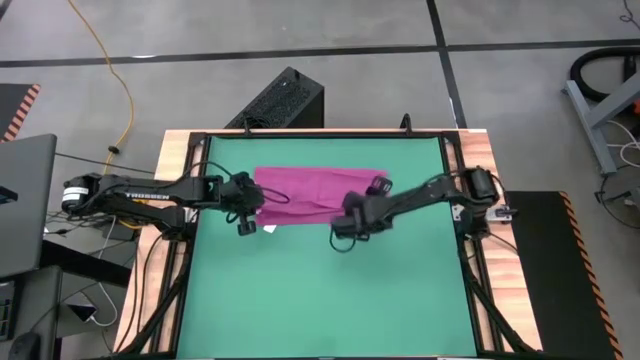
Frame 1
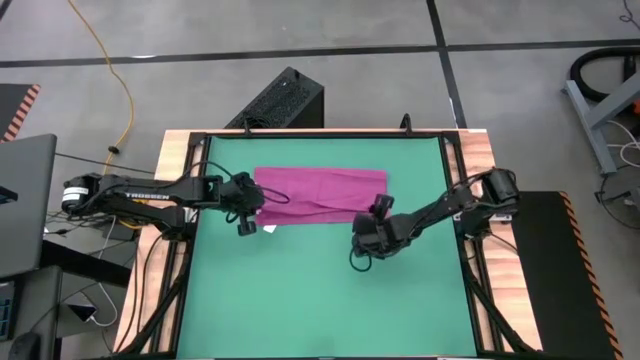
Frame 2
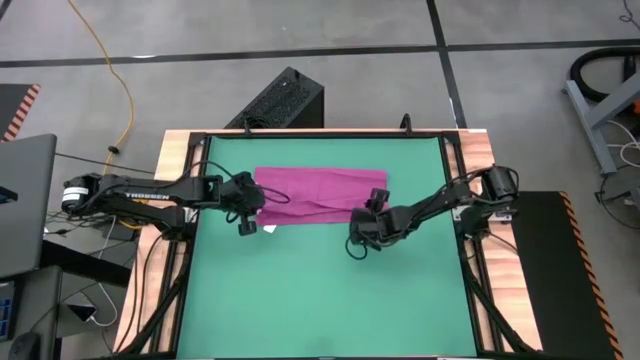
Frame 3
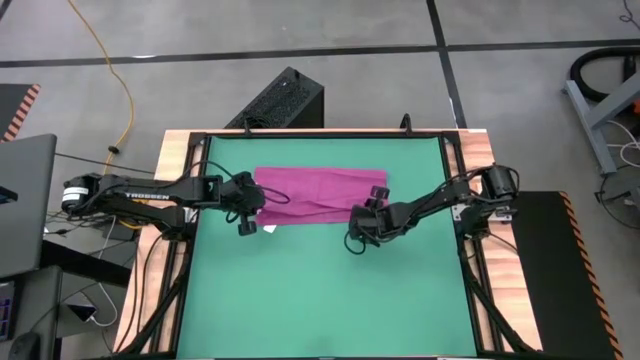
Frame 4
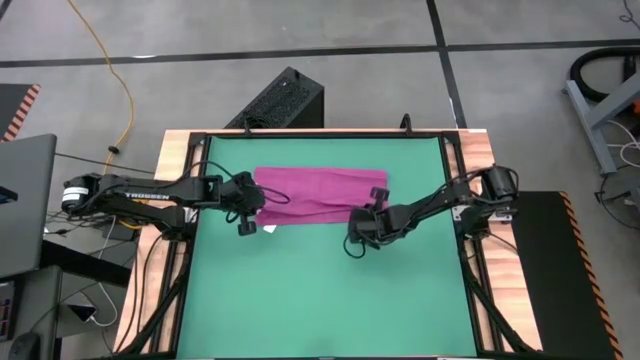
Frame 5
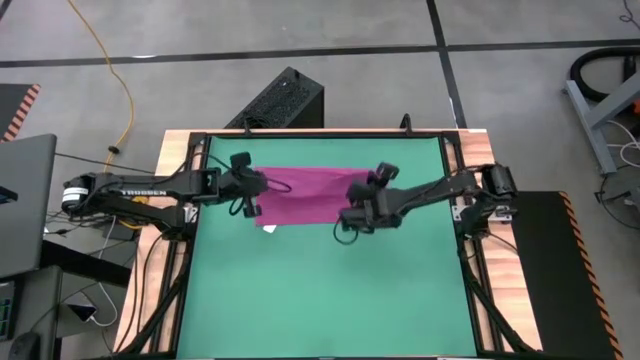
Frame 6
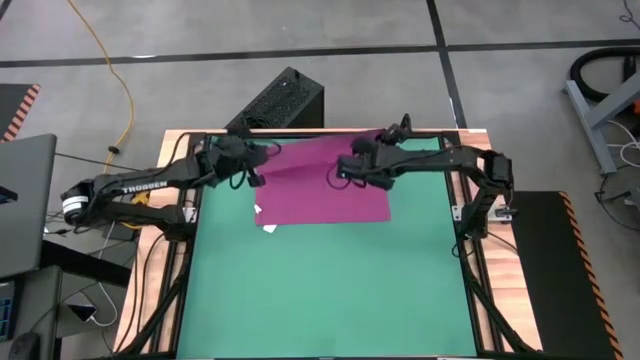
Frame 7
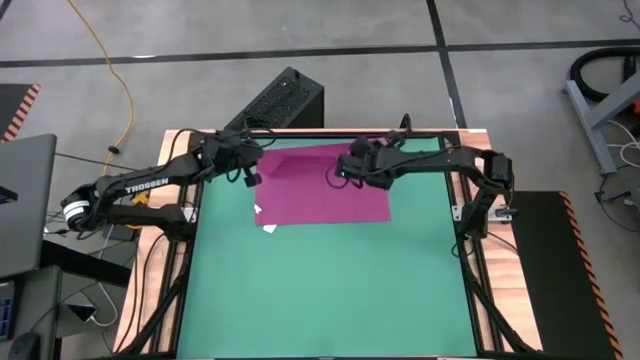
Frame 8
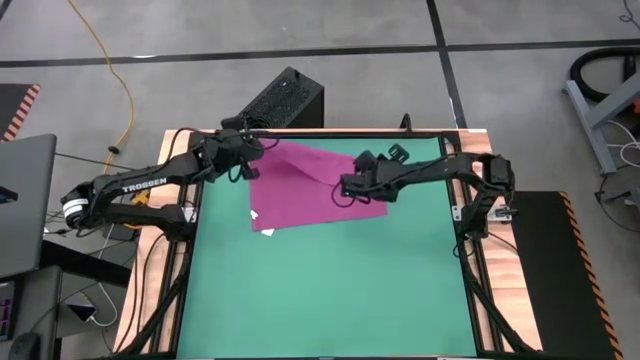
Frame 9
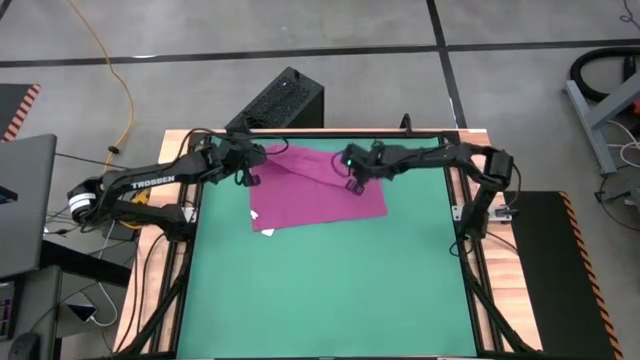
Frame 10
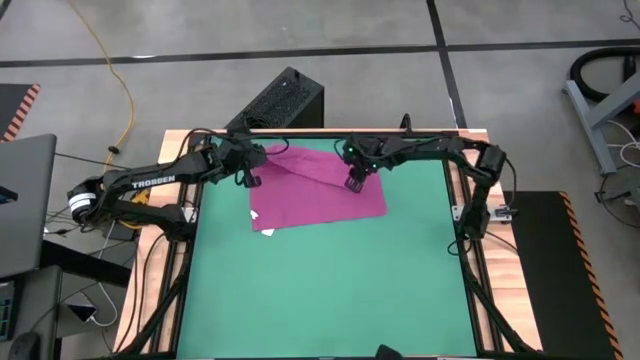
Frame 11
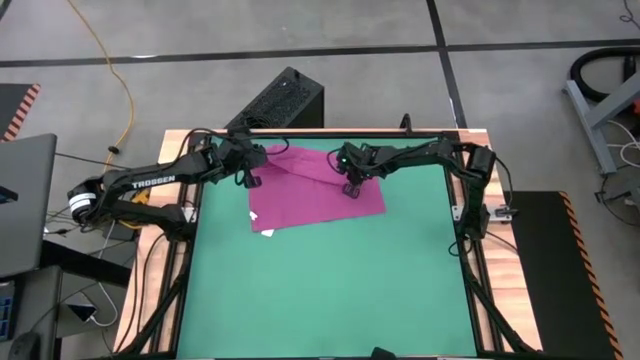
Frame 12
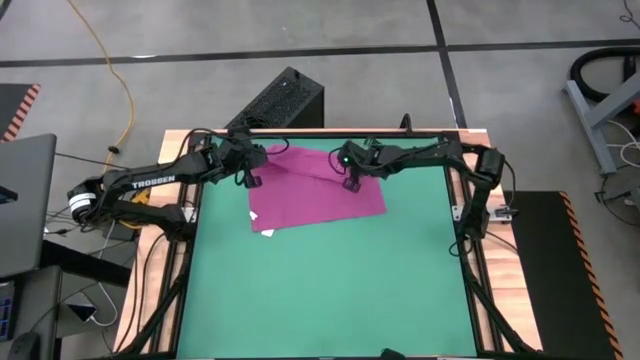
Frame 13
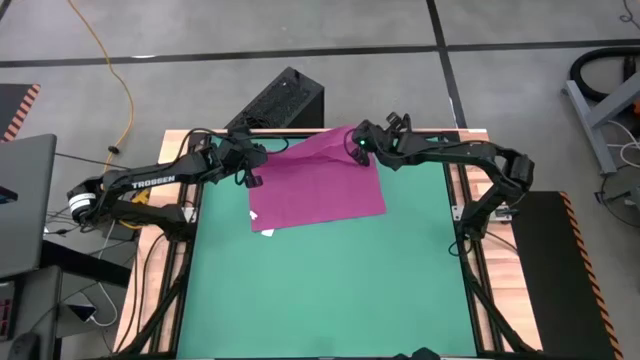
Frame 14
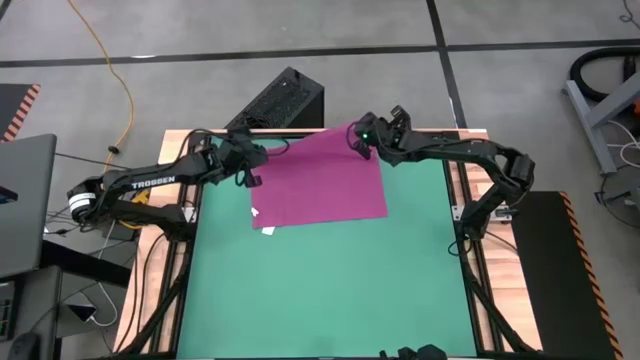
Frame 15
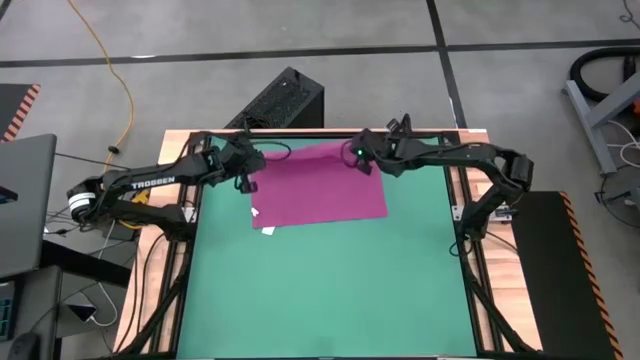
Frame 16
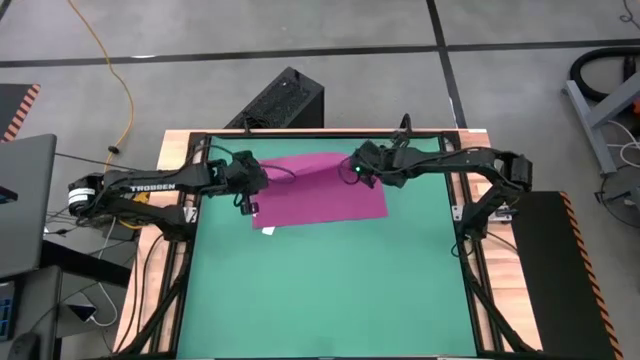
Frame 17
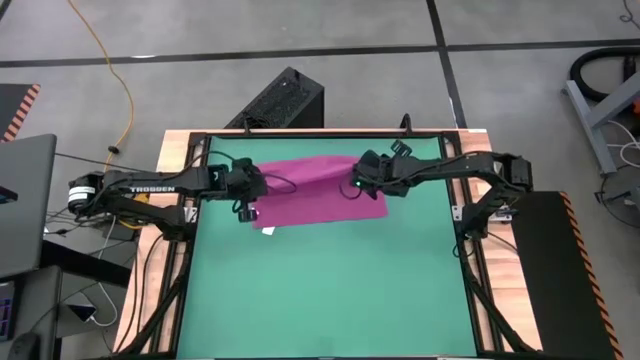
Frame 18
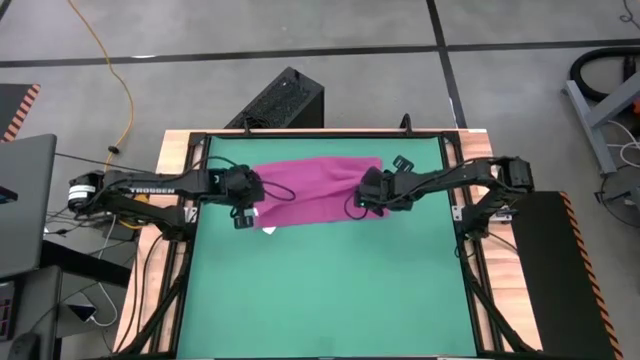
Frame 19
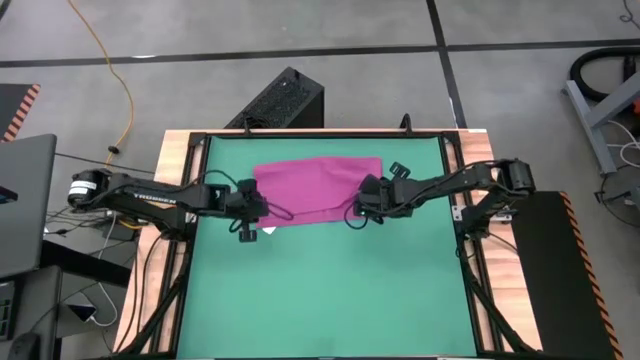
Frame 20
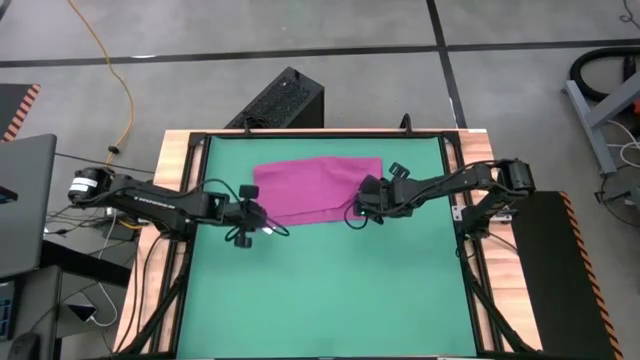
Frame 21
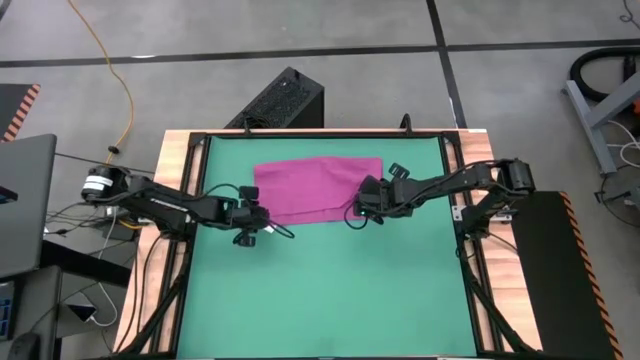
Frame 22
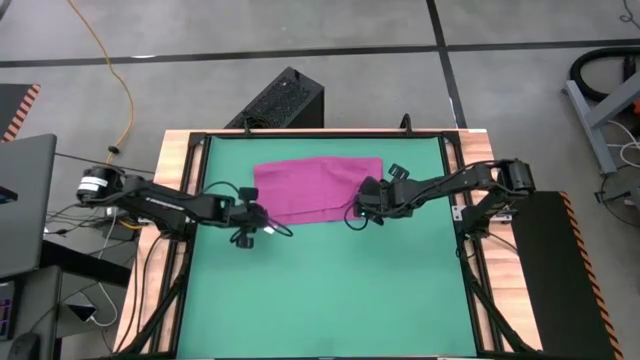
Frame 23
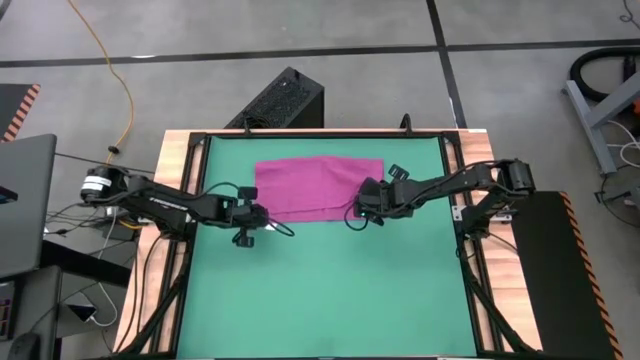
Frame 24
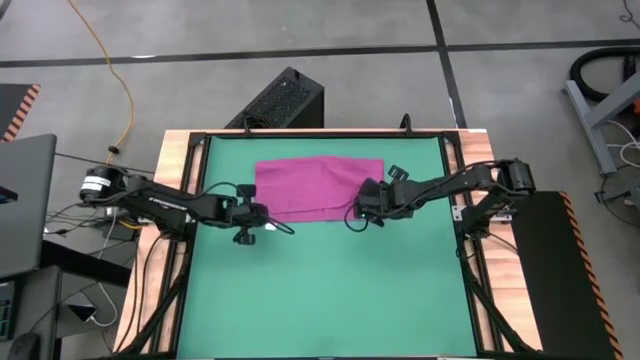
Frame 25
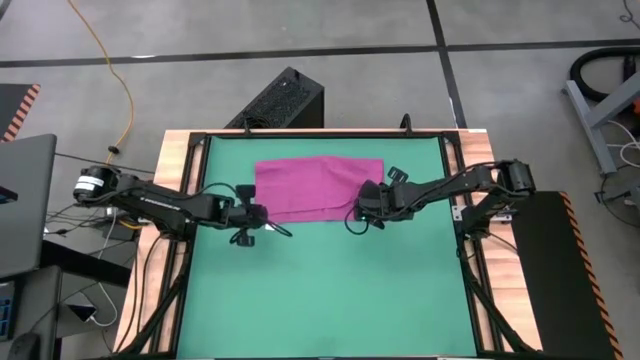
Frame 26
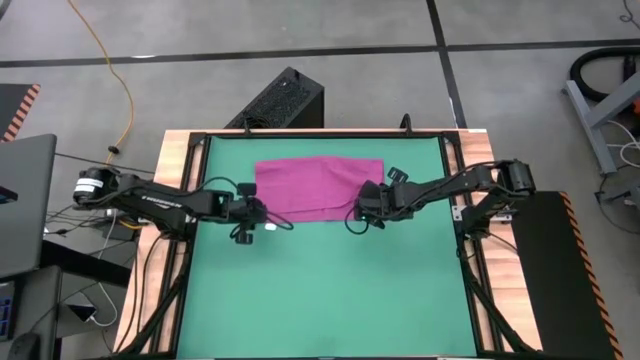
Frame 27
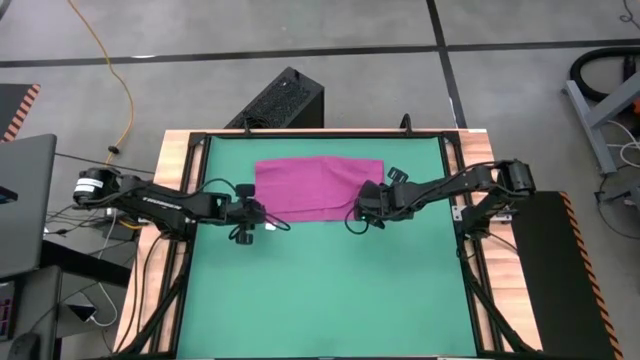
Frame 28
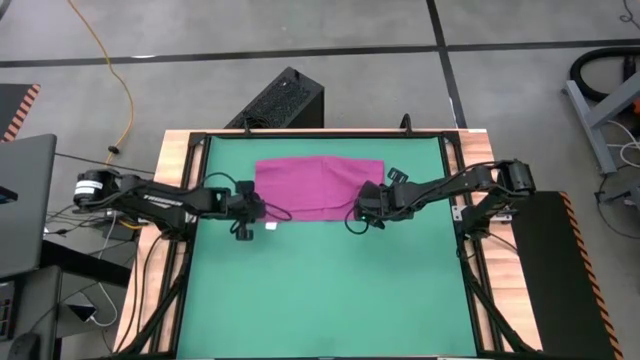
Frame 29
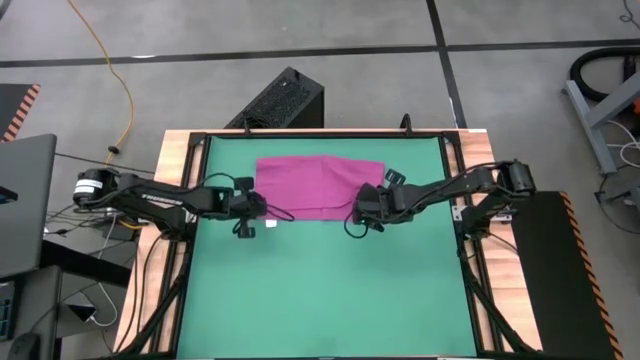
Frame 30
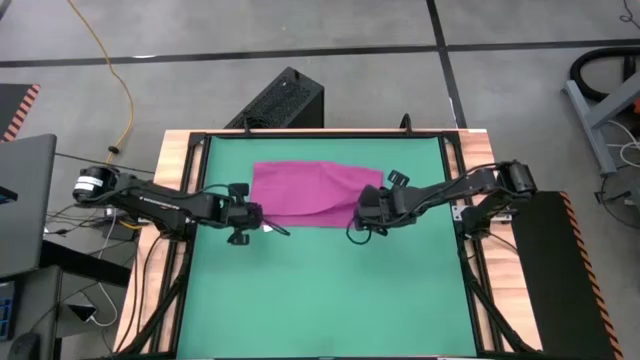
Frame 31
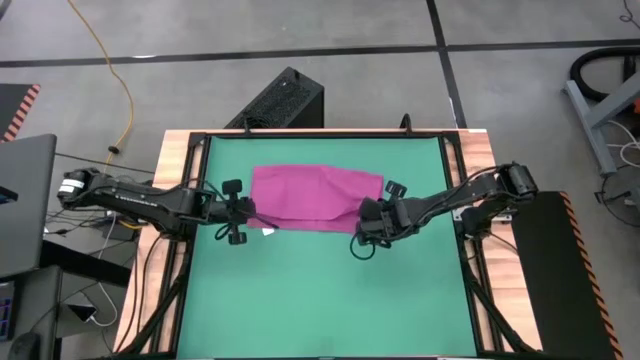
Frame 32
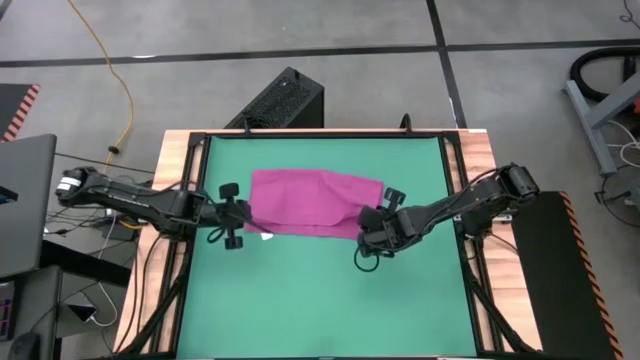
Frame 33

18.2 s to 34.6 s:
Task: Roll towel into tight, uniform cylinder
Fold the pink towel

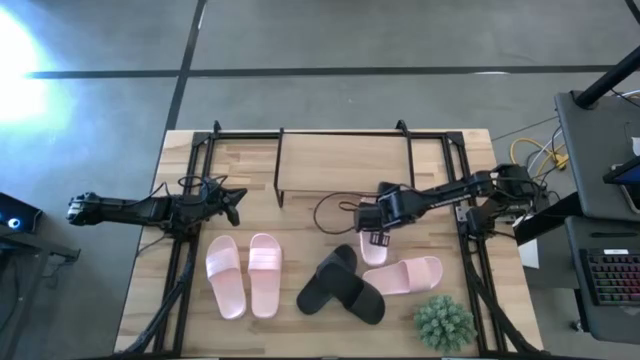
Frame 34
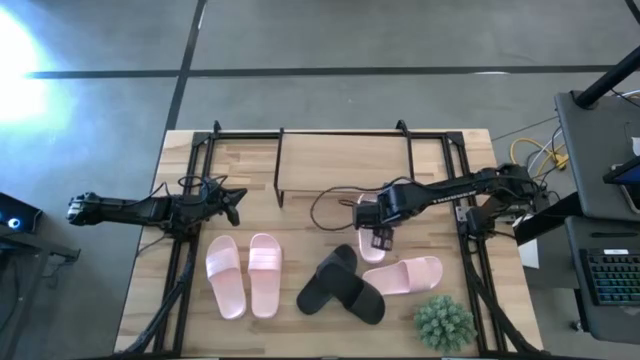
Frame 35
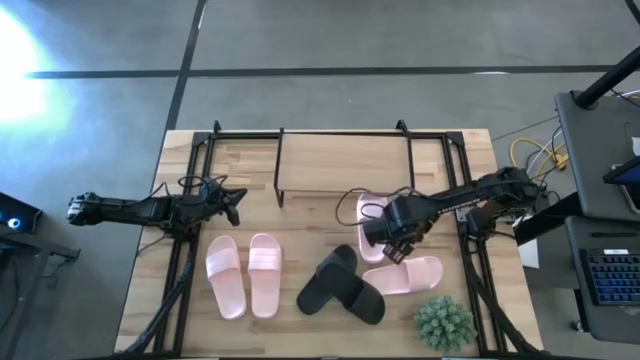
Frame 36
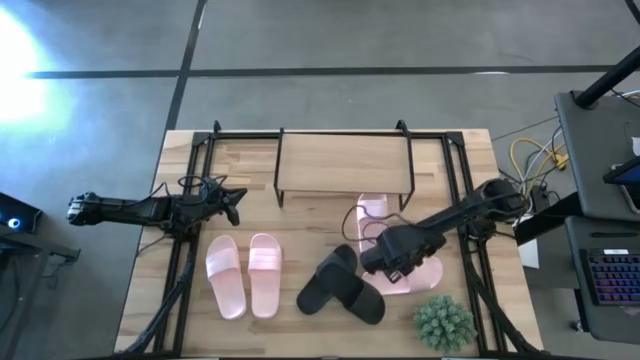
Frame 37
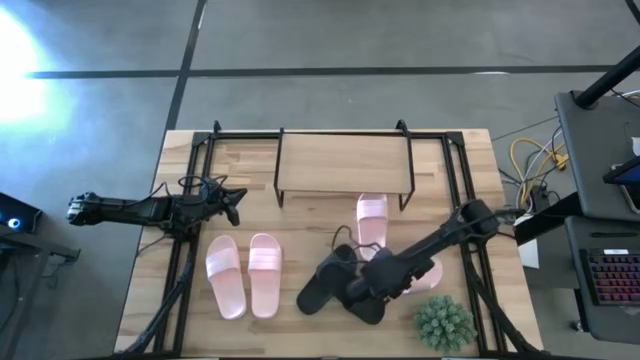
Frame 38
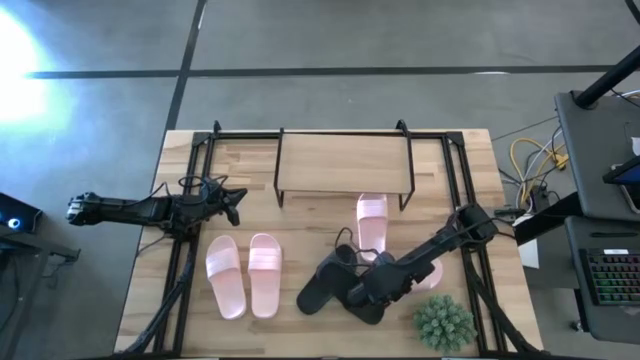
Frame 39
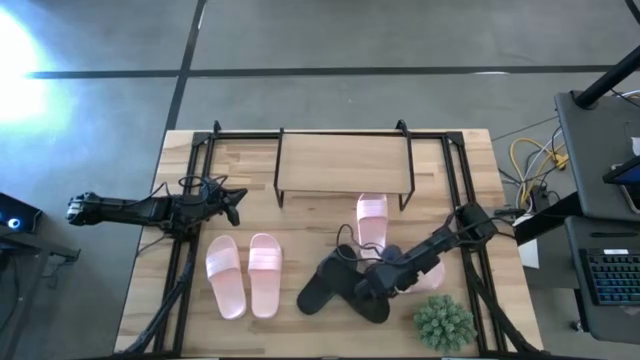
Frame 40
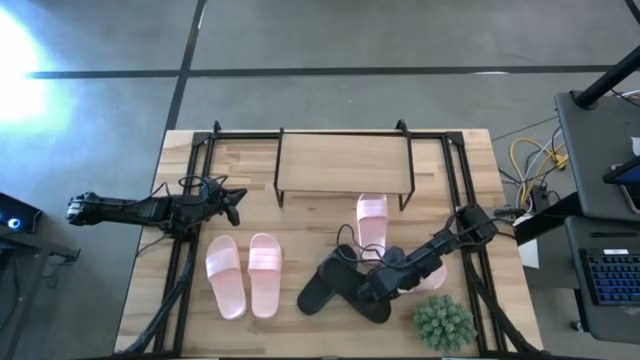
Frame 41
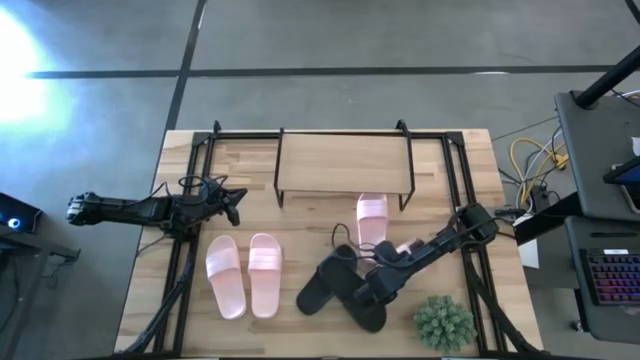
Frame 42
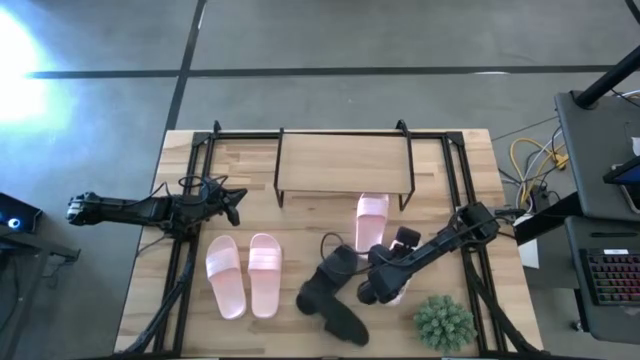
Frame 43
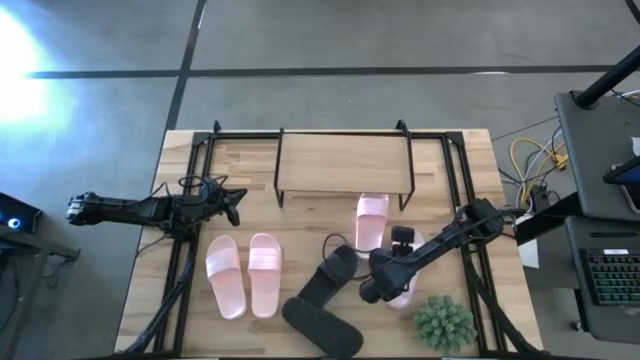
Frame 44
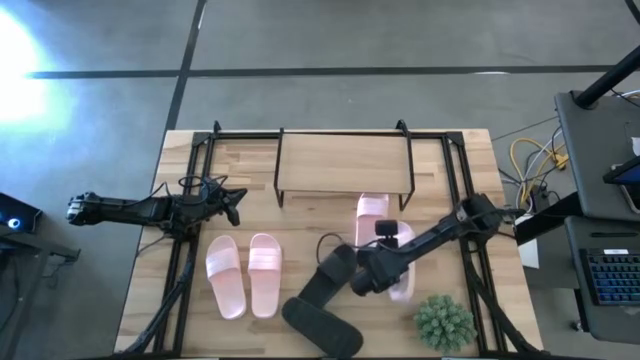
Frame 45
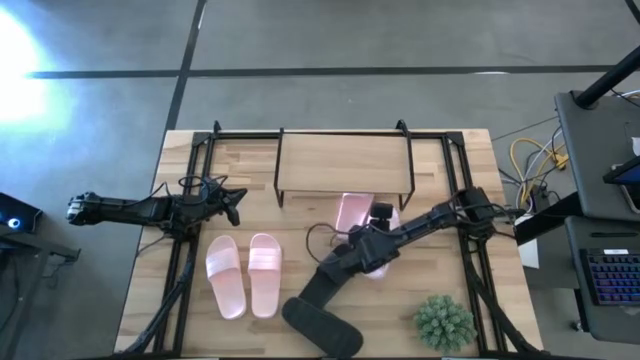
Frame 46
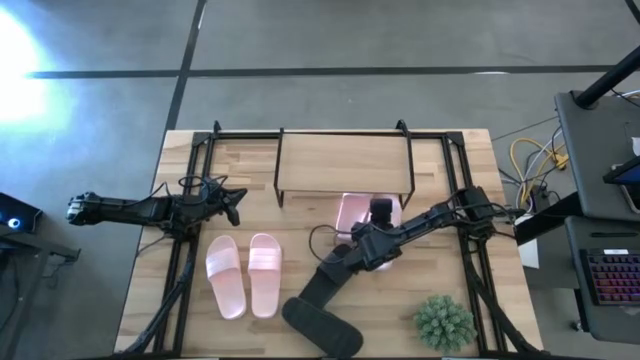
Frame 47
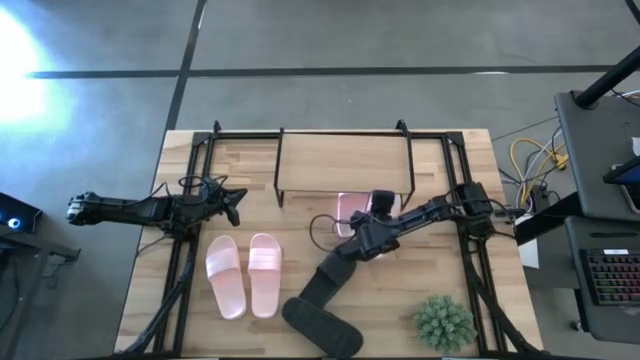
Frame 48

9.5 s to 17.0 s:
Task: Pick and place slides into the shelf
Put the pink slide under the shelf
